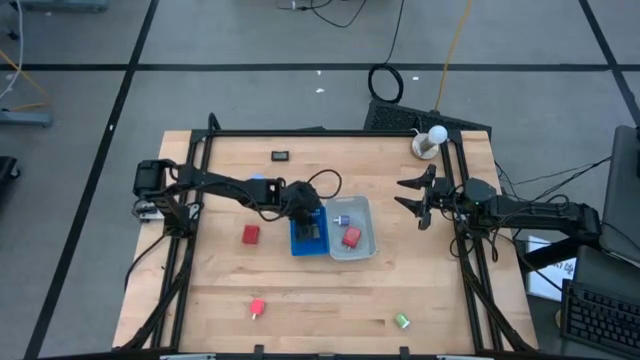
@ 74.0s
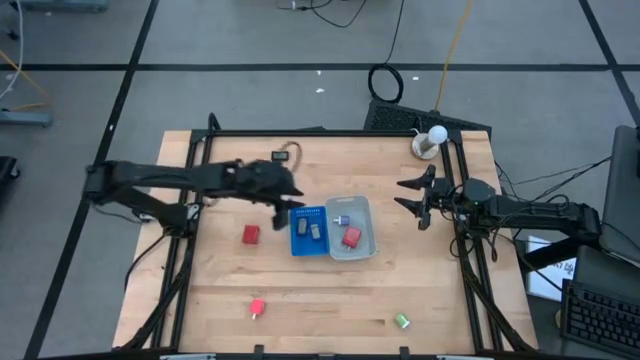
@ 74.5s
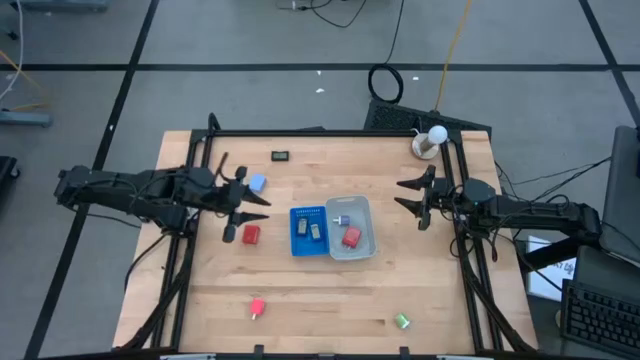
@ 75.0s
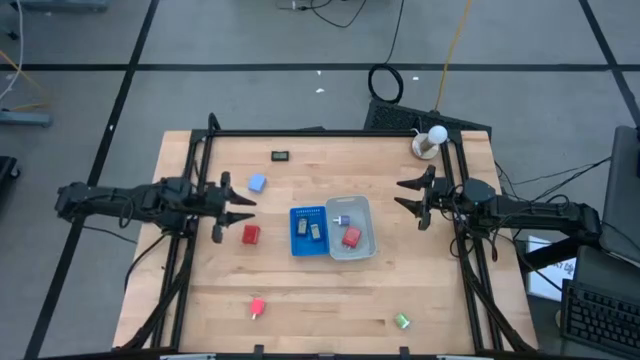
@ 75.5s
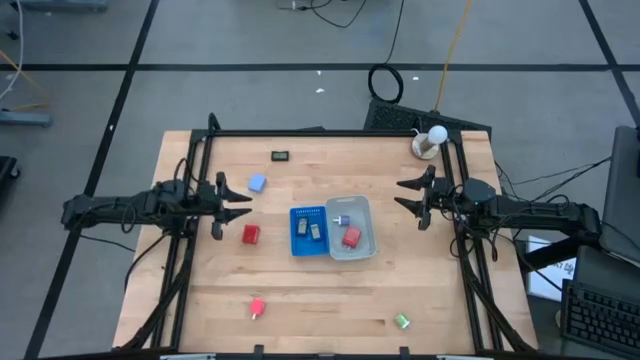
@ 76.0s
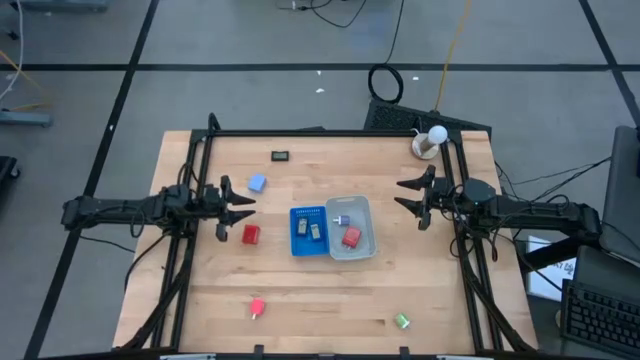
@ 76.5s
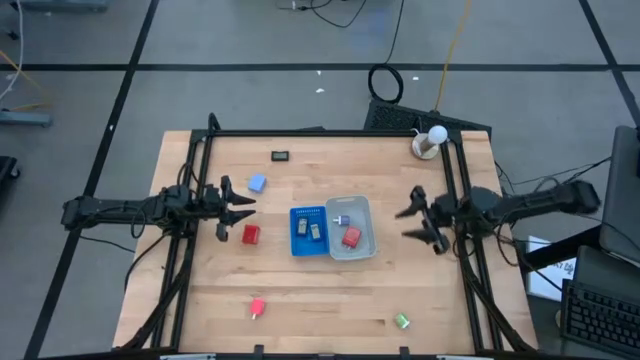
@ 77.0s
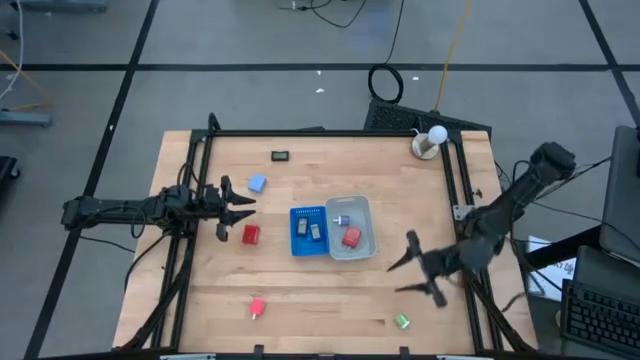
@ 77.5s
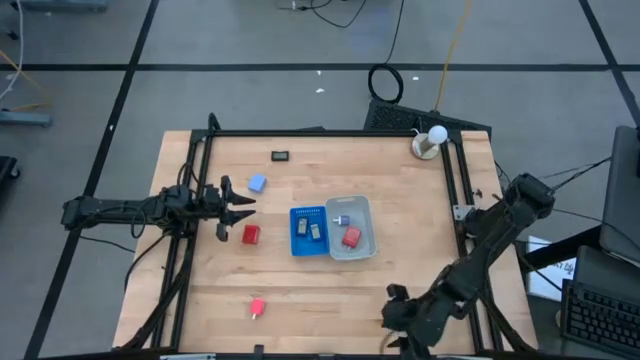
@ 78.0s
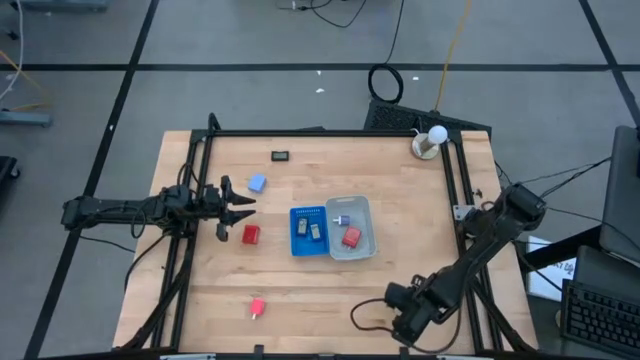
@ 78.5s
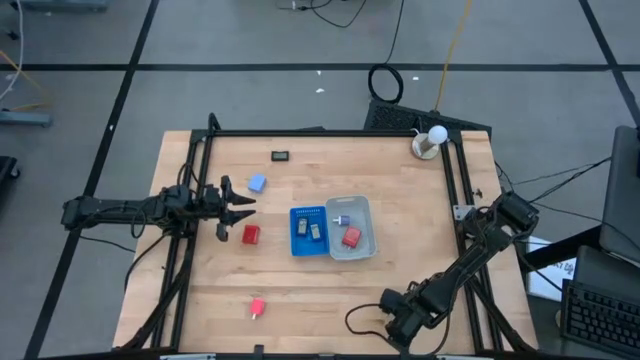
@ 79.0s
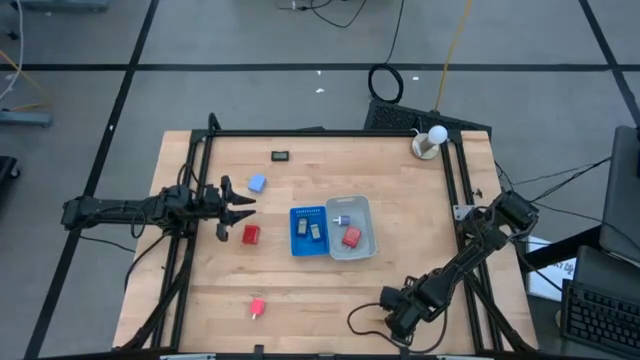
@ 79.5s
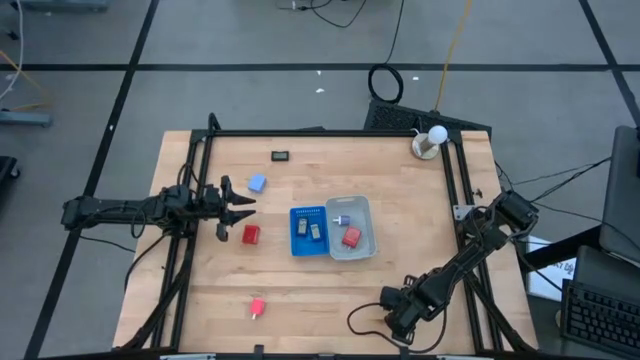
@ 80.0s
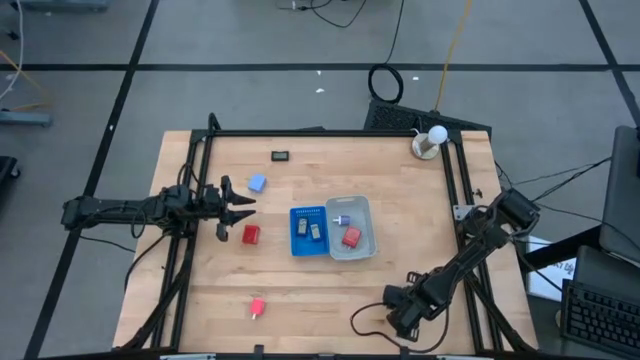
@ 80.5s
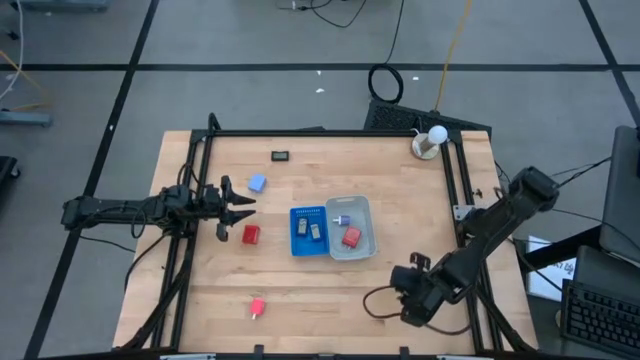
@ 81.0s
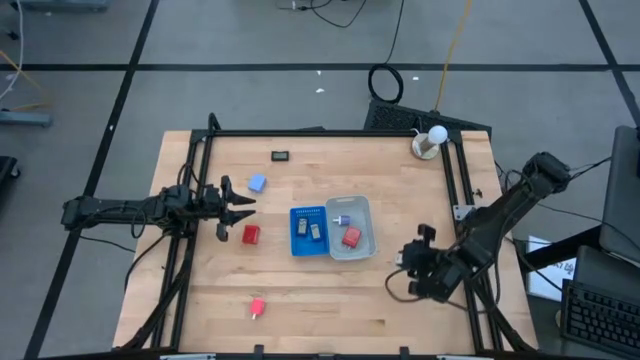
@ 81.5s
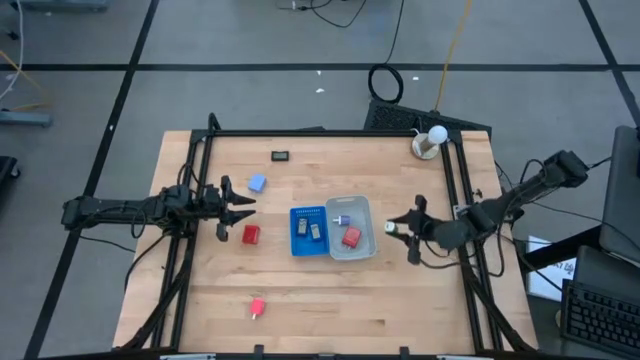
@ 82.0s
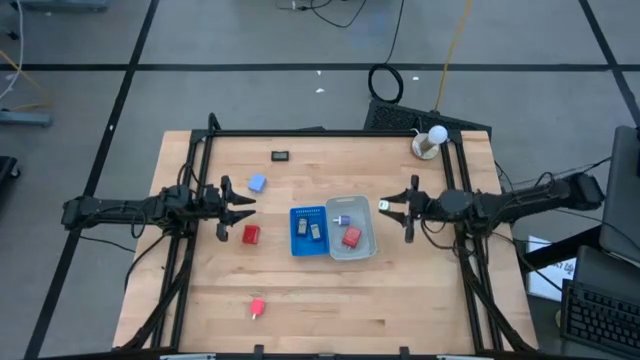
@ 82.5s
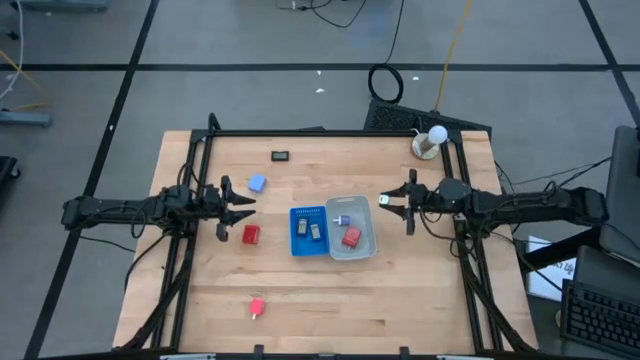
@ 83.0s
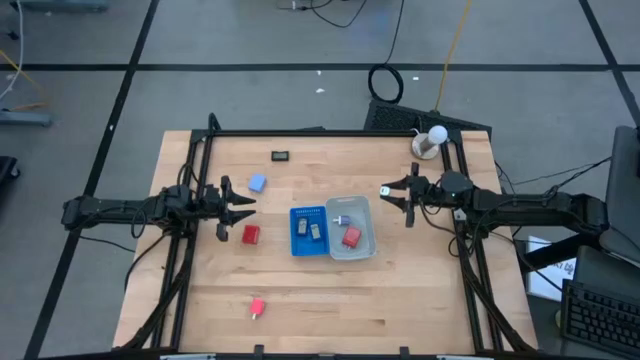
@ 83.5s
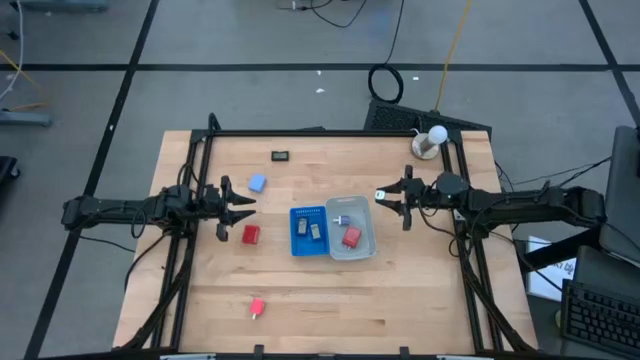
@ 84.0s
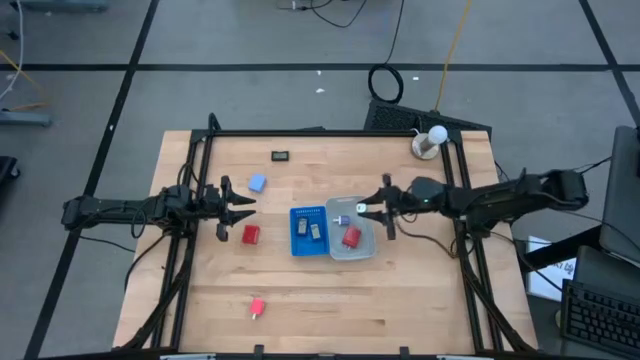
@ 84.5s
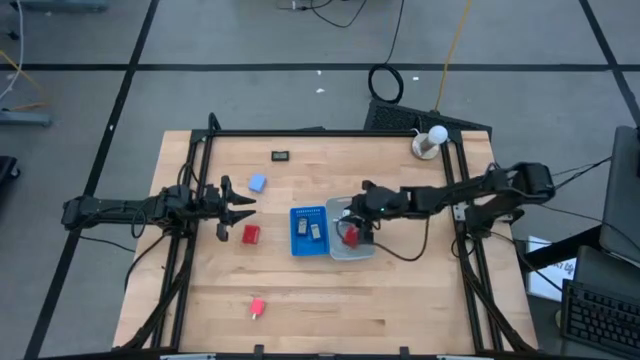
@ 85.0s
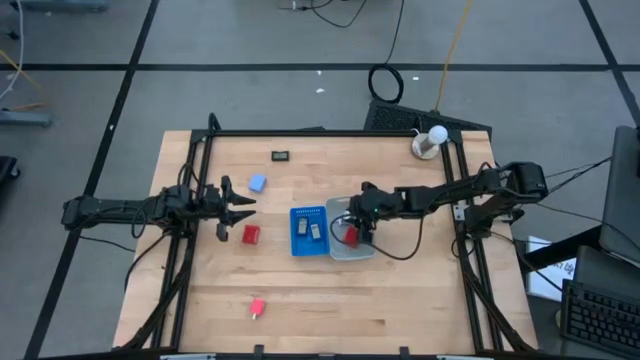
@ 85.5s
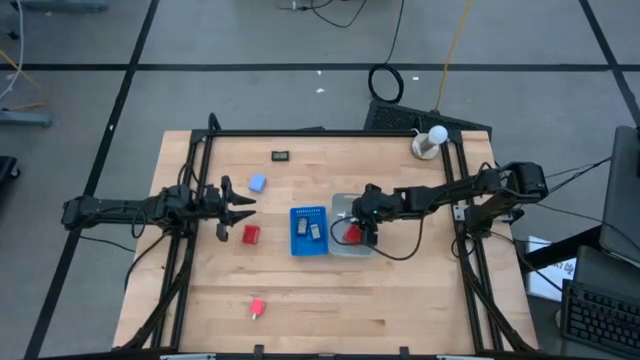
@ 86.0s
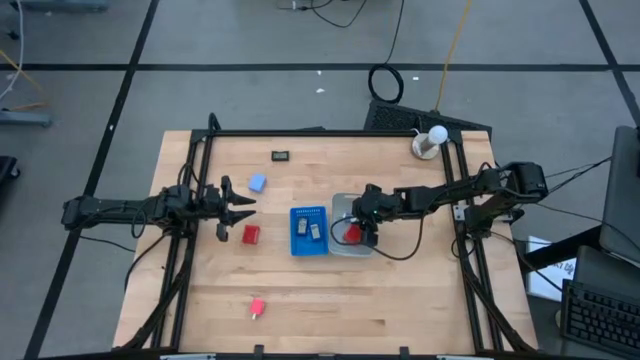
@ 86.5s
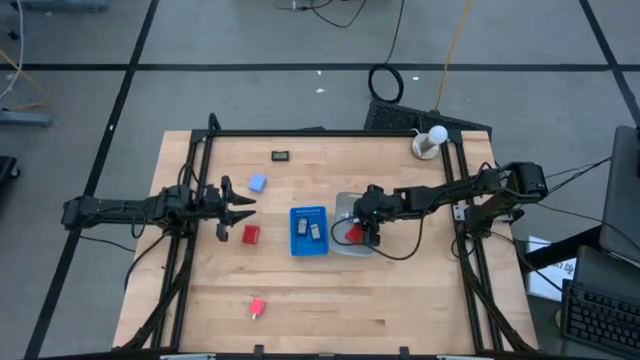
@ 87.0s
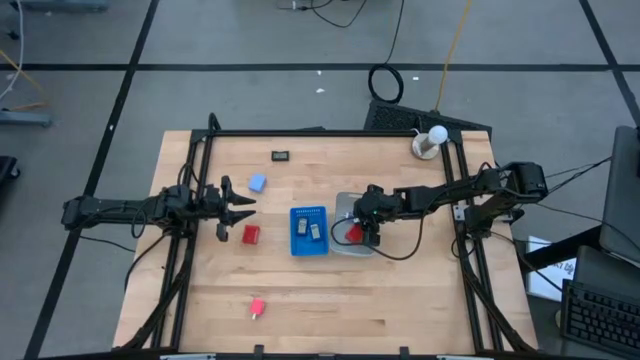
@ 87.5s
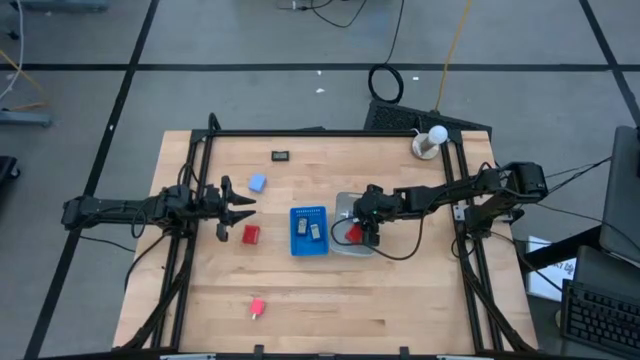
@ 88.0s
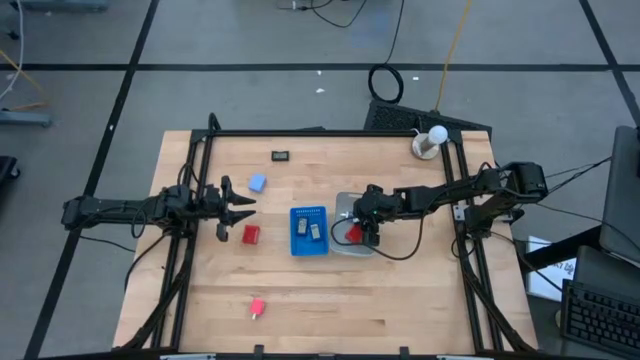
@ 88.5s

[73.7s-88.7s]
Task: Pick & Place Office items
Put the green charger adapter into the gray bin

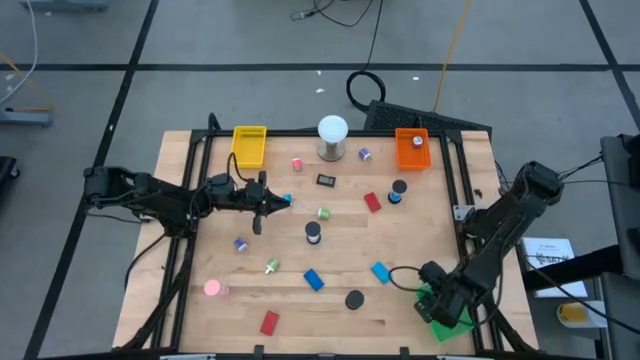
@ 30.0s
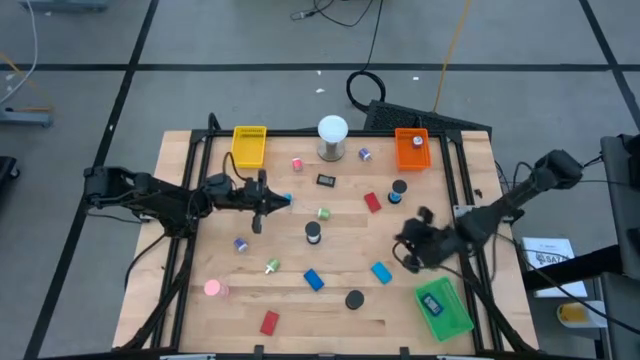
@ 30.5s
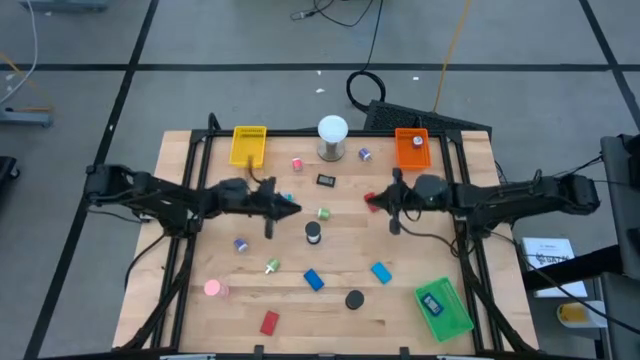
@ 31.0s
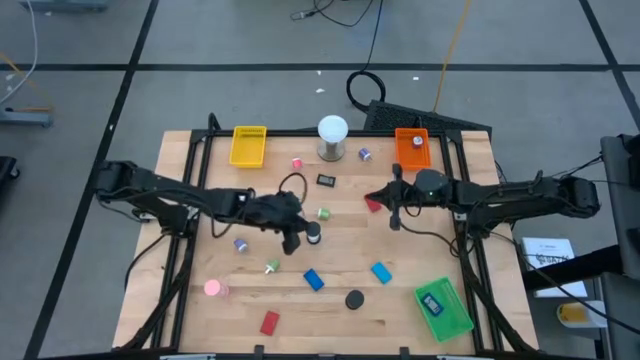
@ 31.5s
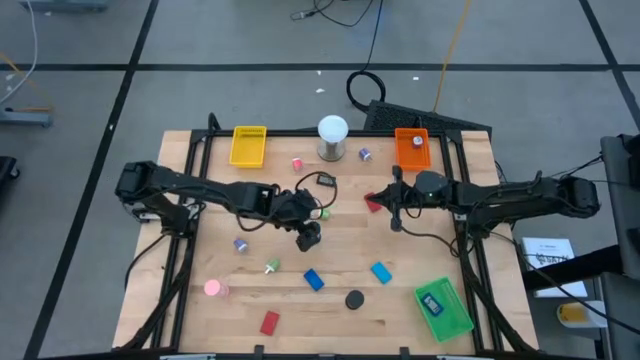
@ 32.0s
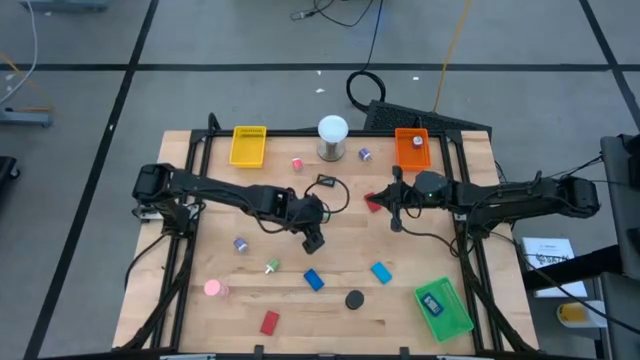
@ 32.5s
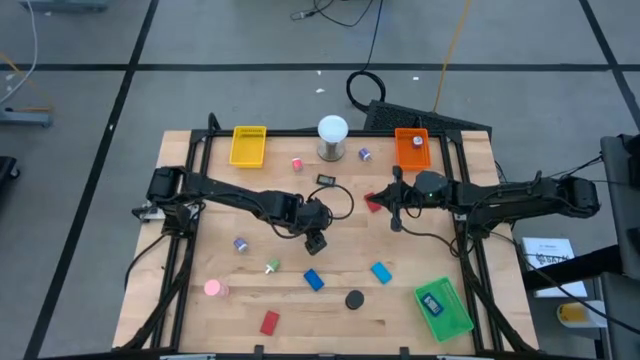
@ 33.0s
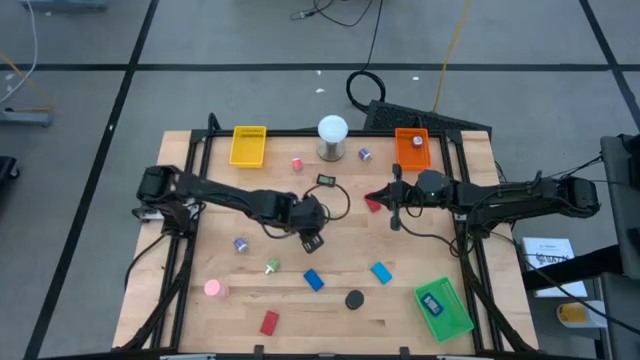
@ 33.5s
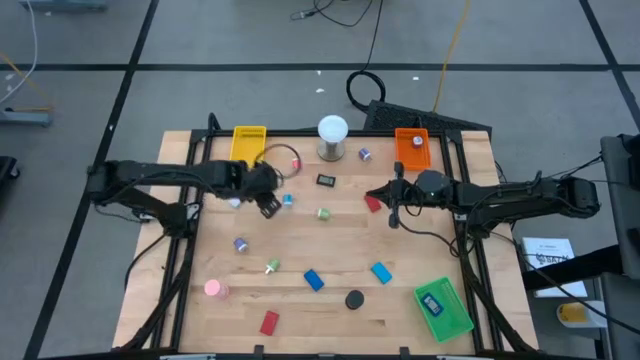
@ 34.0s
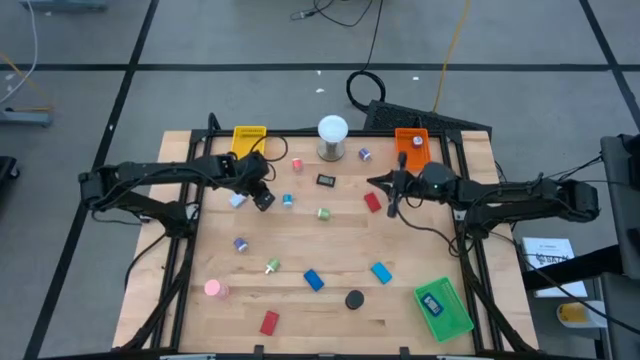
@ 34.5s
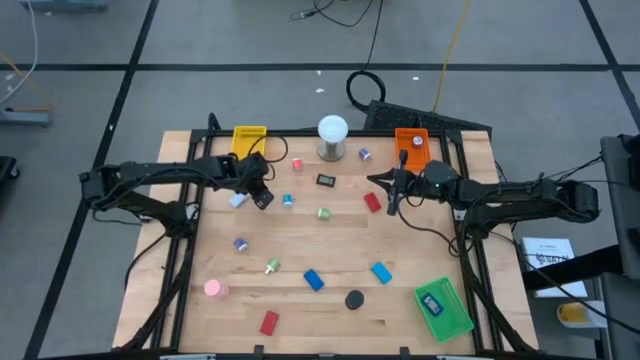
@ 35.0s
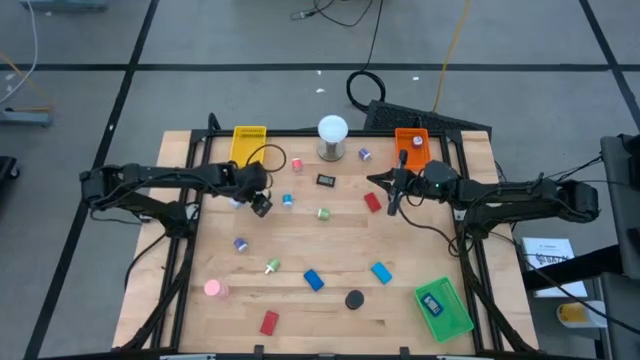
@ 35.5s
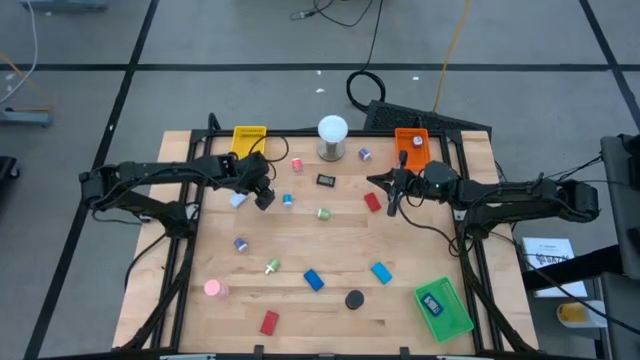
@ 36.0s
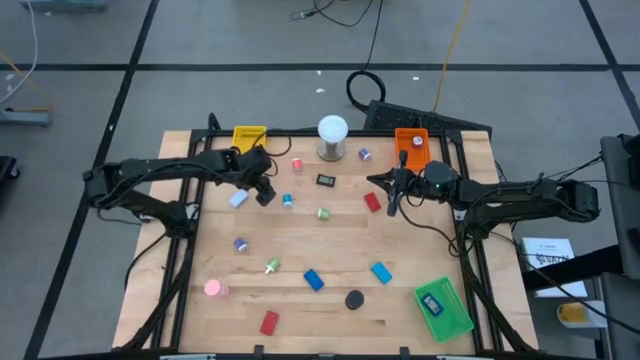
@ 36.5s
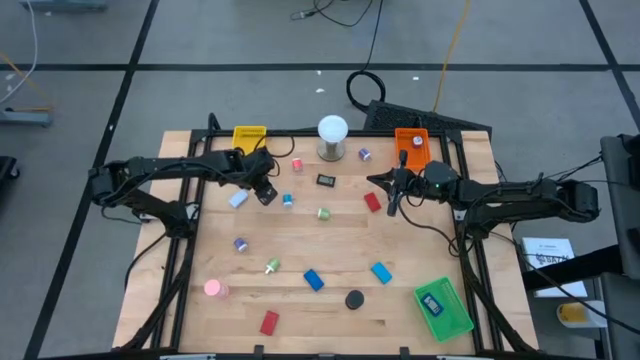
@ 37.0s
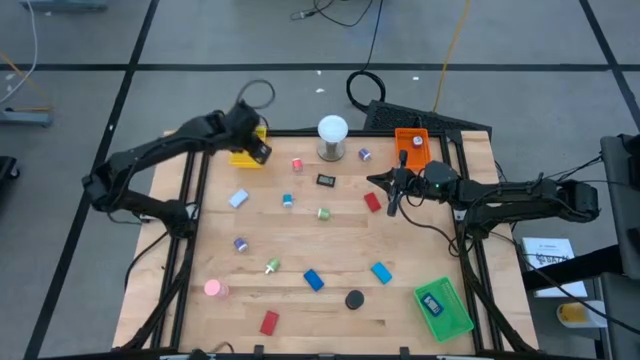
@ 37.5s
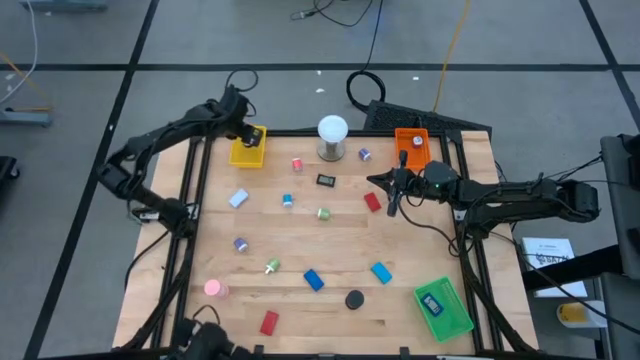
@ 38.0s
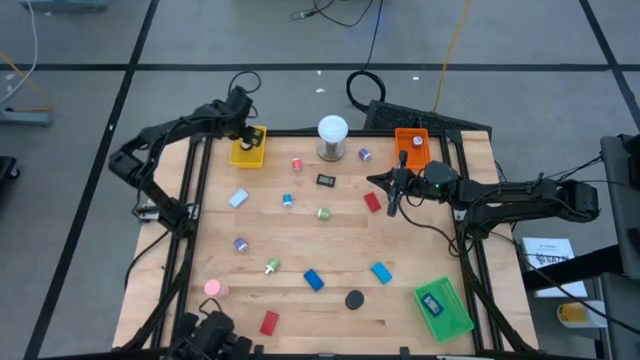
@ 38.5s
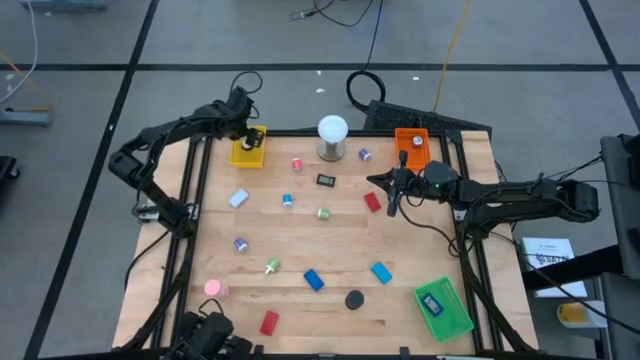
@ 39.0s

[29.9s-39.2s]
Task: Pick & Place Office items
Put the white hour glass into the yellow bin
